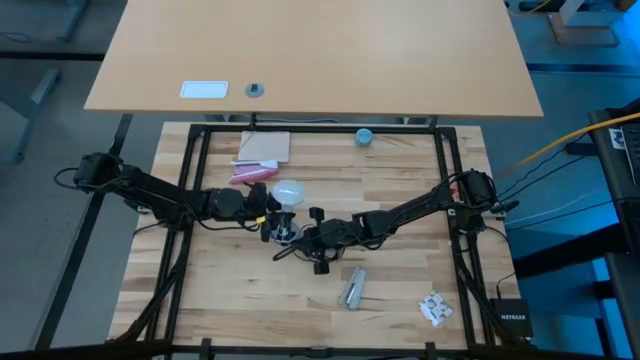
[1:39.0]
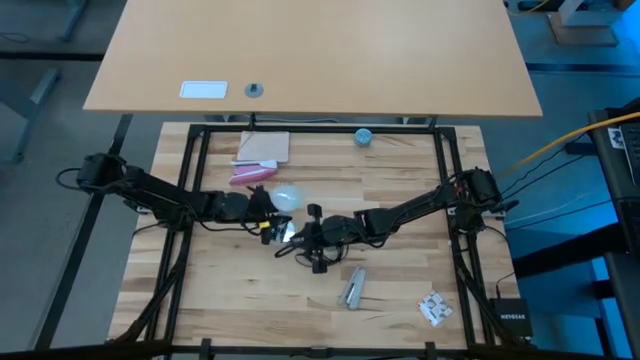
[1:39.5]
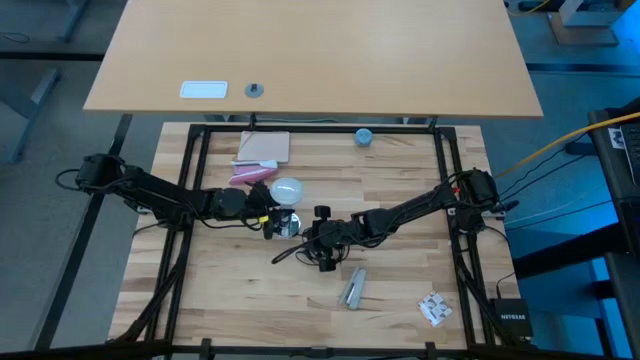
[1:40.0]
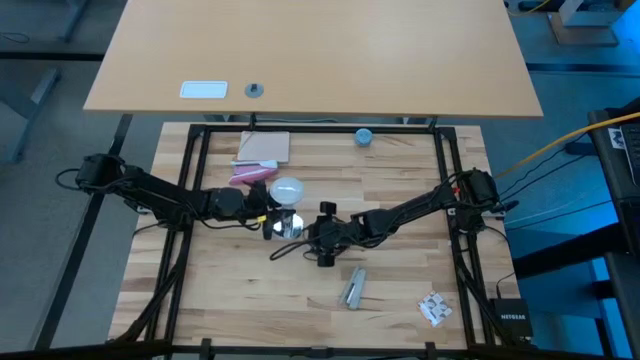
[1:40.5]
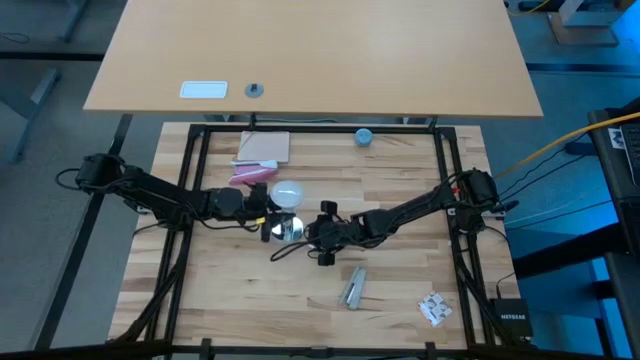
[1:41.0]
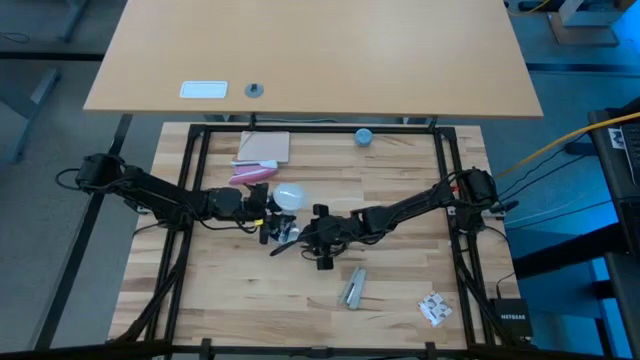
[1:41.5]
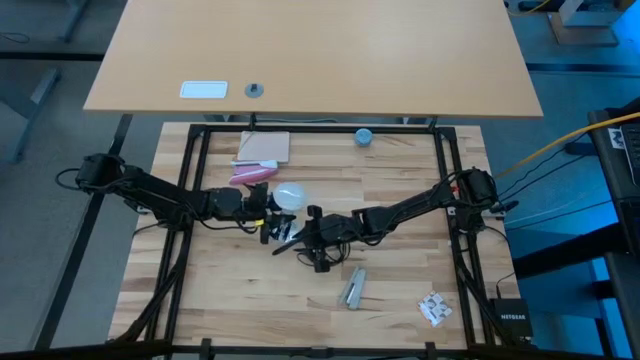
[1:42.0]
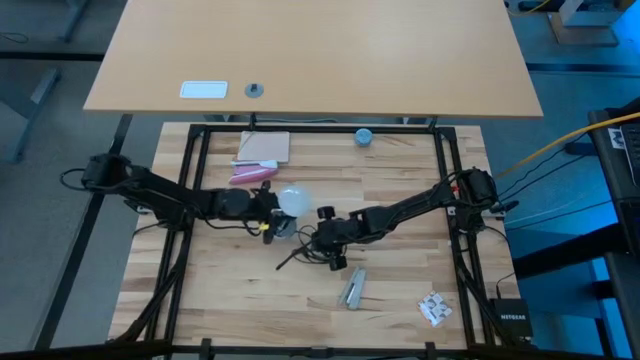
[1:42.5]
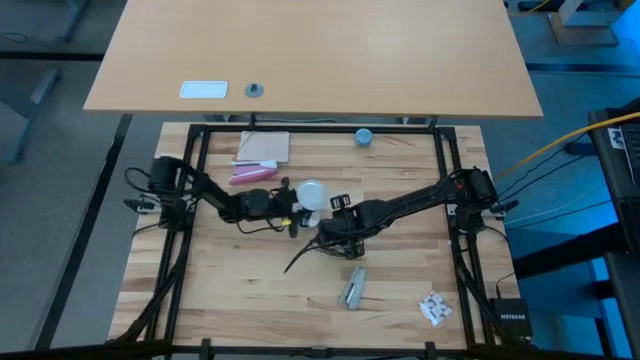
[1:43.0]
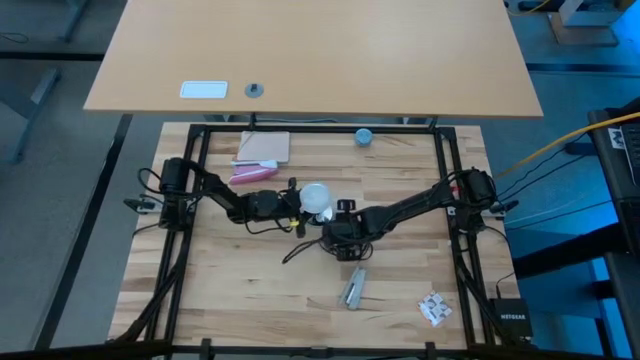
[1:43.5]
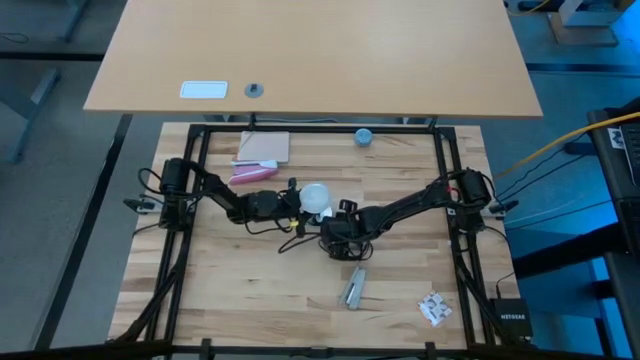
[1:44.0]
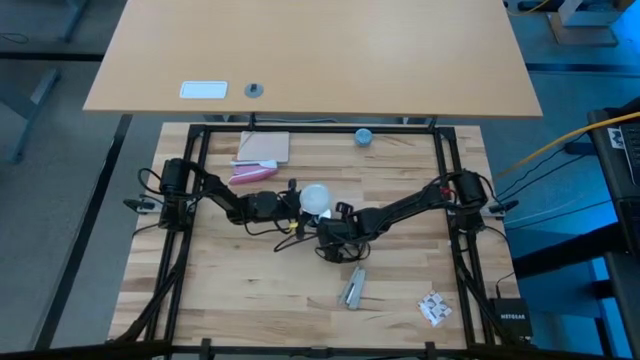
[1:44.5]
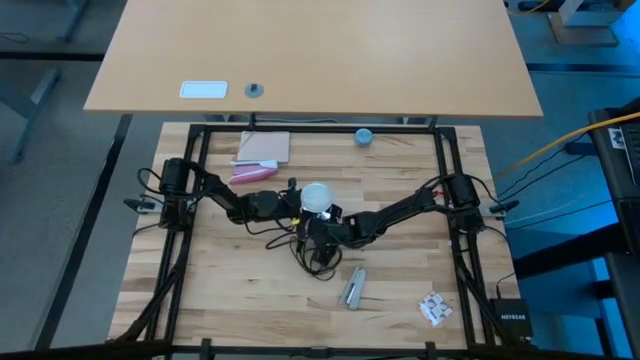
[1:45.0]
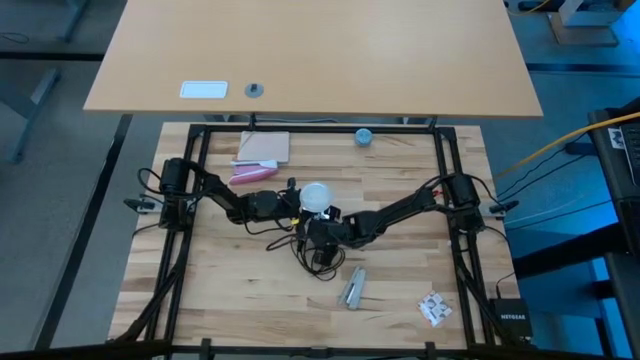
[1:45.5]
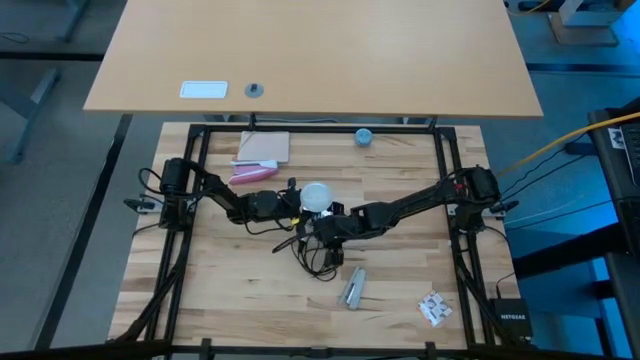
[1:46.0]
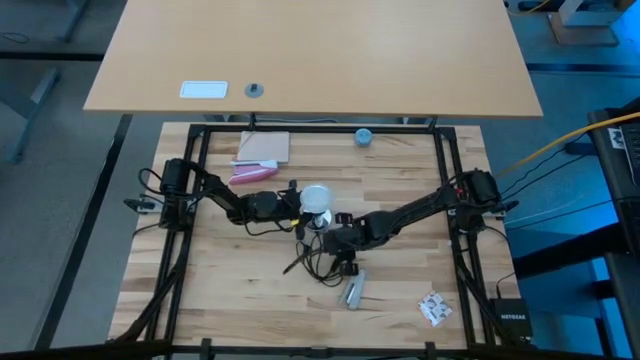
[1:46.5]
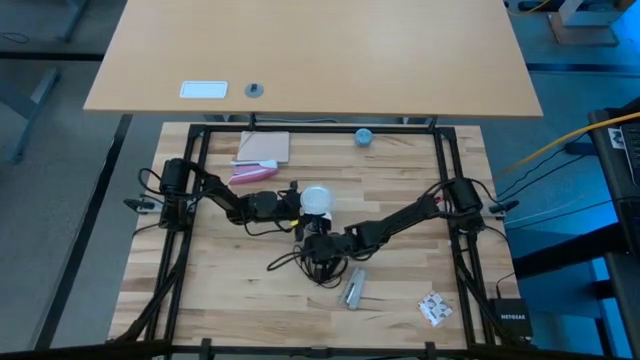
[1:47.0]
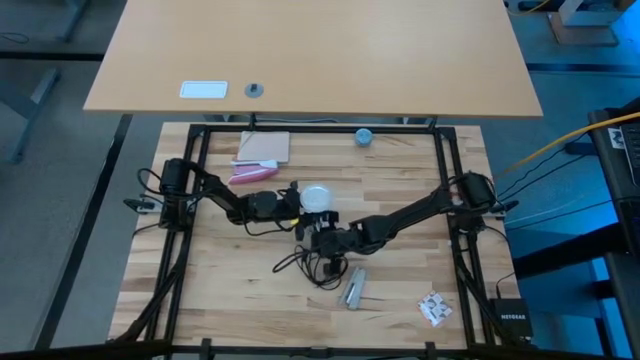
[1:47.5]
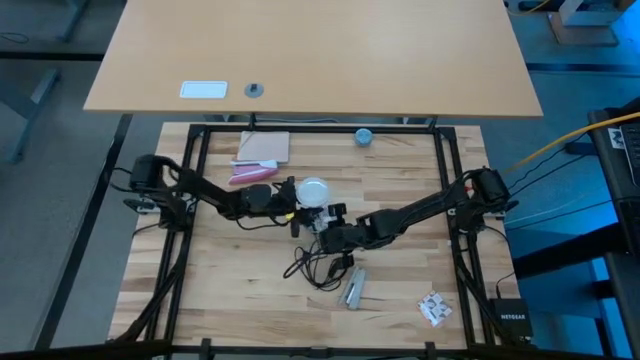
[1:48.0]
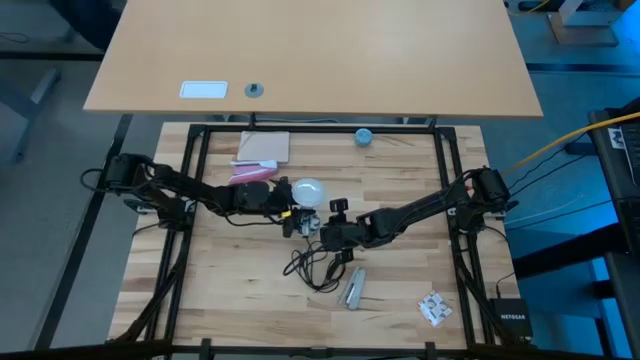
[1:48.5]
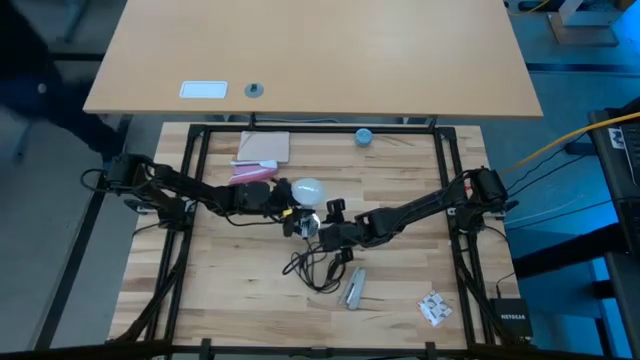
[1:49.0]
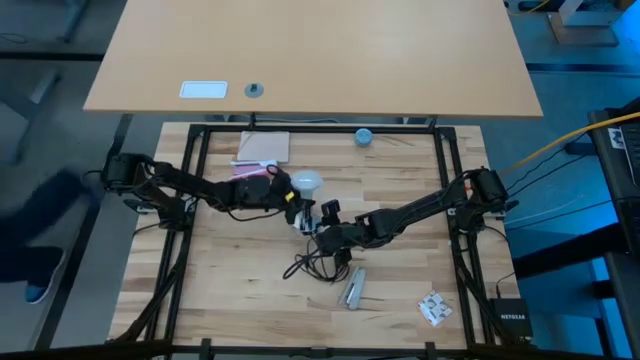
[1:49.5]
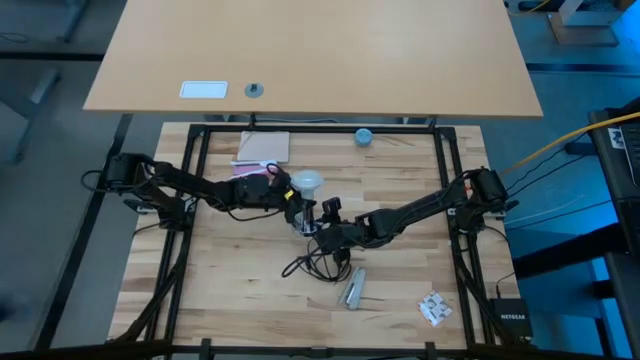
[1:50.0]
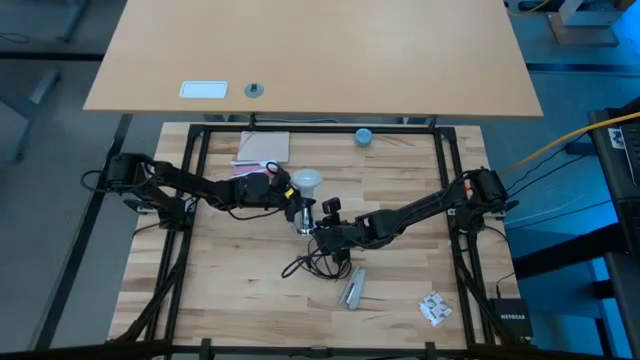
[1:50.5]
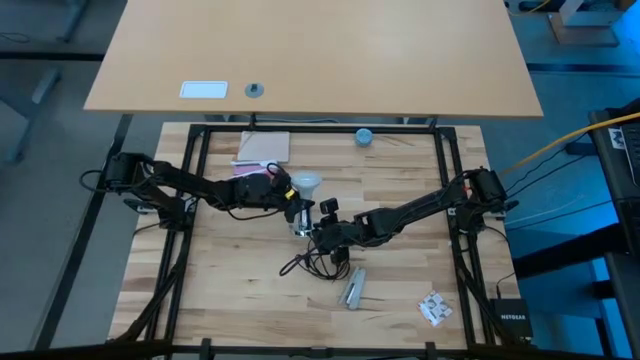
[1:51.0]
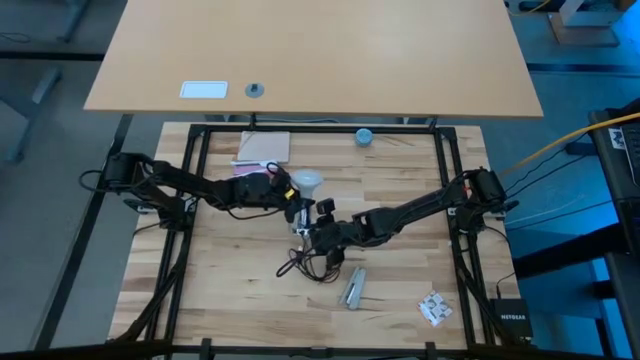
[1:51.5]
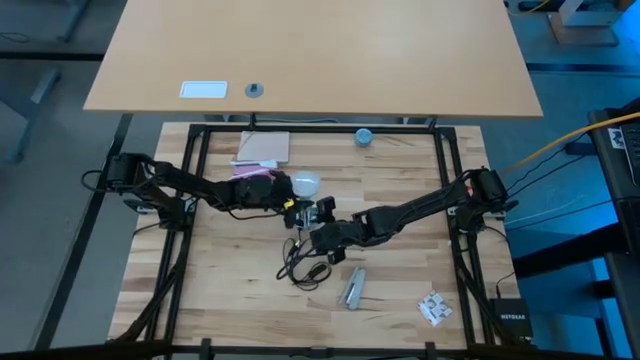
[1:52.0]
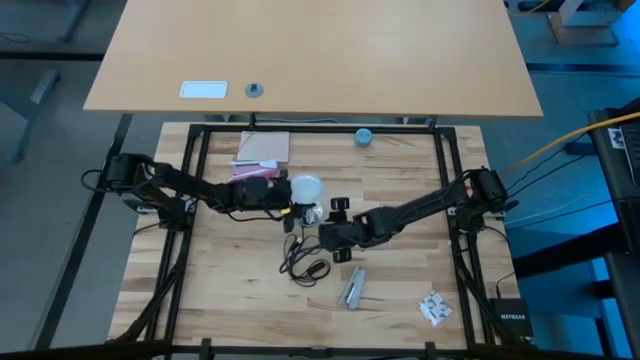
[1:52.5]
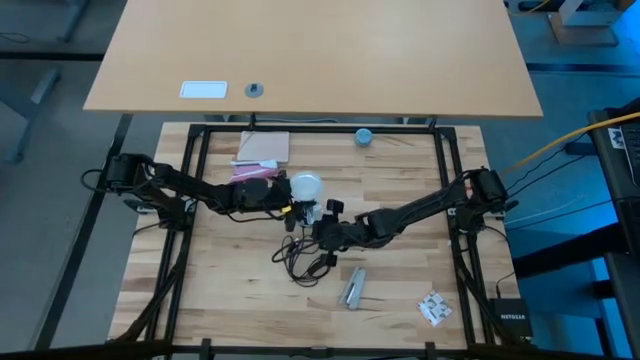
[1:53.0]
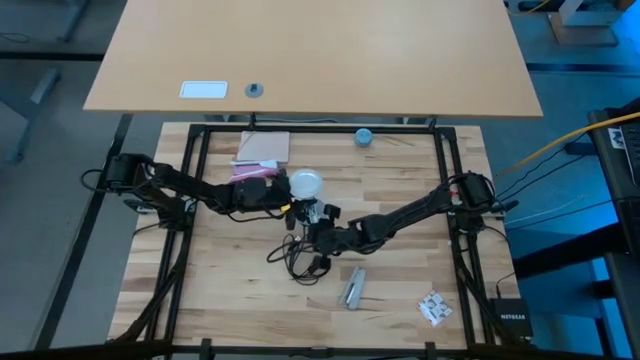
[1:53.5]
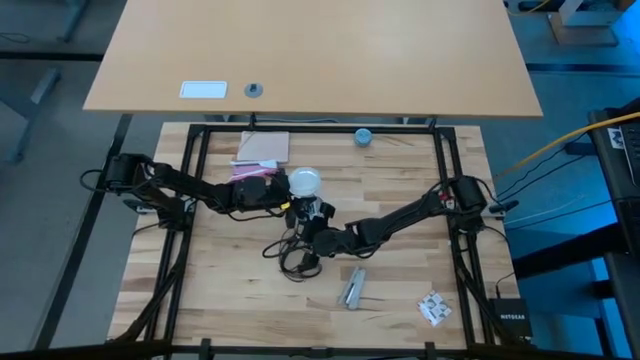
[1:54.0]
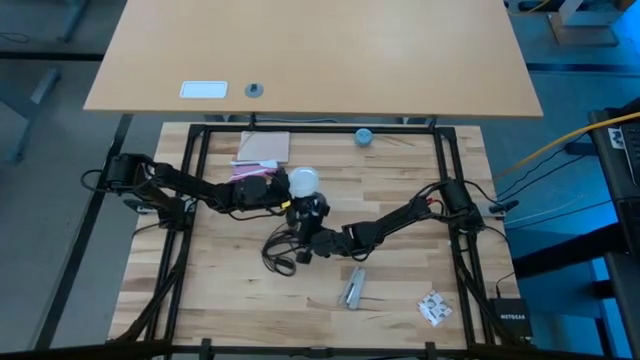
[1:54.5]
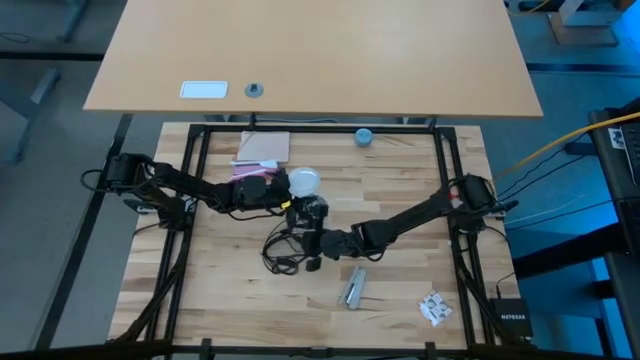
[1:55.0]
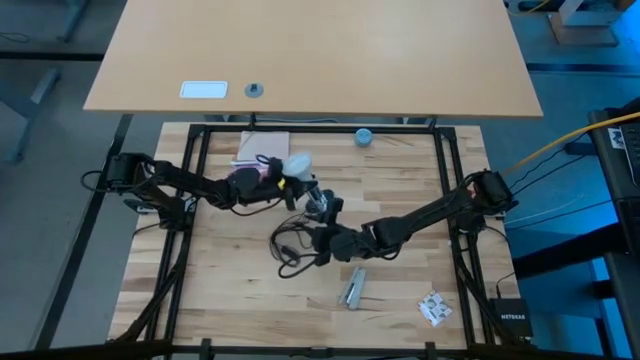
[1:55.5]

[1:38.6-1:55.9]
Task: Screw lightbulb
Remove the lightbulb from the lamp

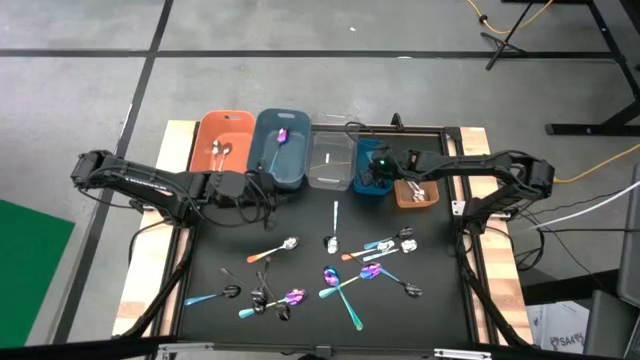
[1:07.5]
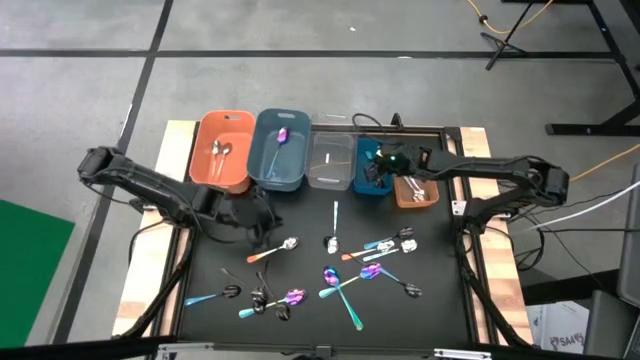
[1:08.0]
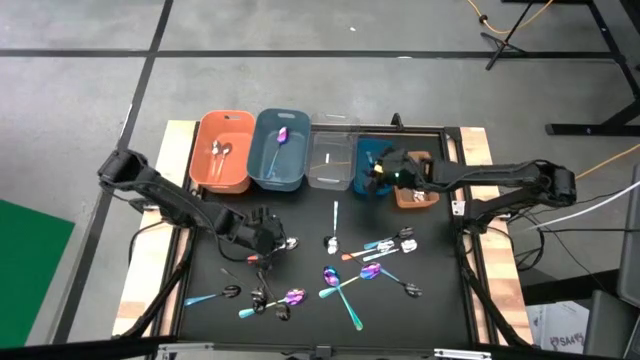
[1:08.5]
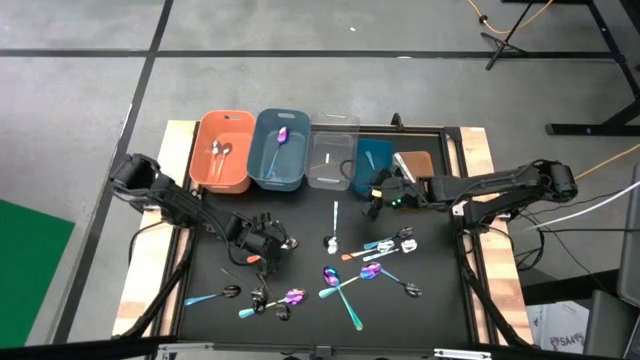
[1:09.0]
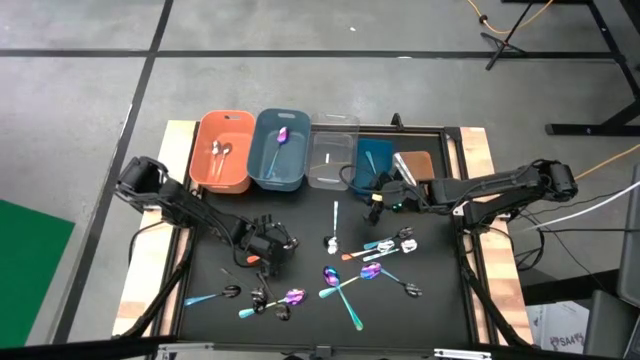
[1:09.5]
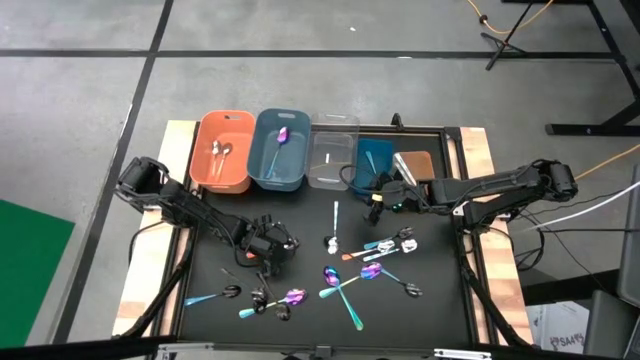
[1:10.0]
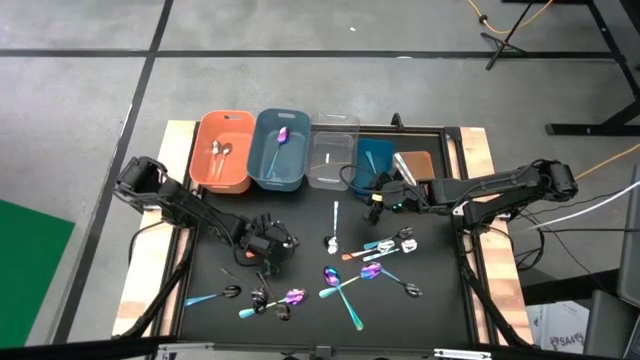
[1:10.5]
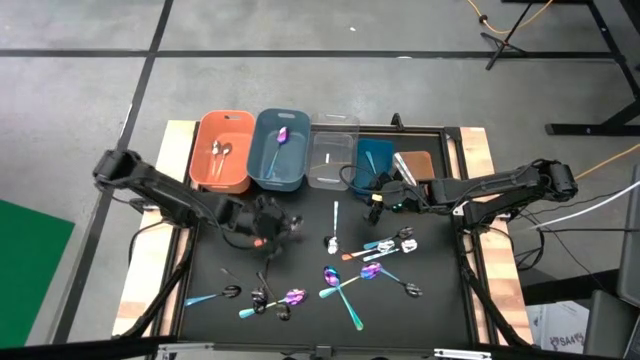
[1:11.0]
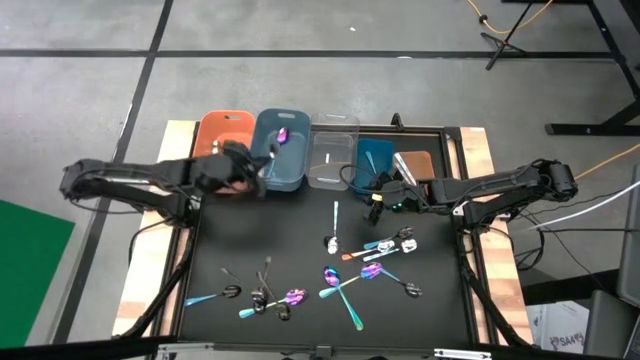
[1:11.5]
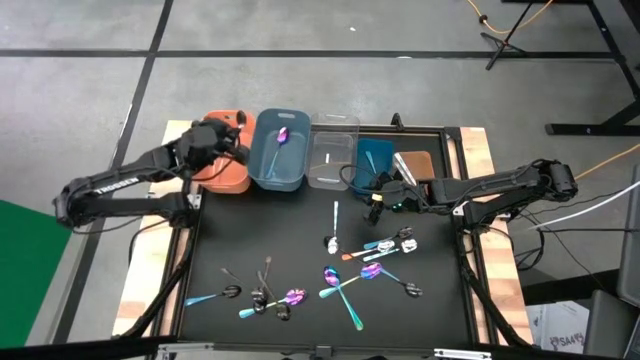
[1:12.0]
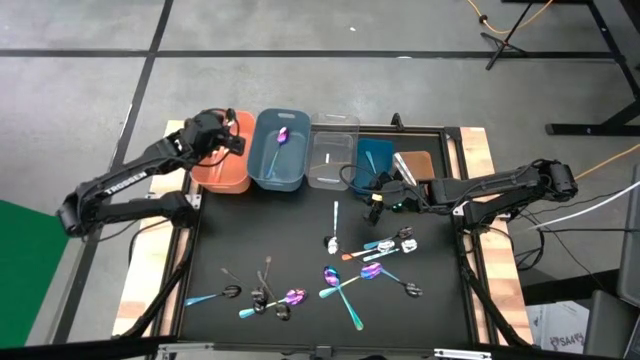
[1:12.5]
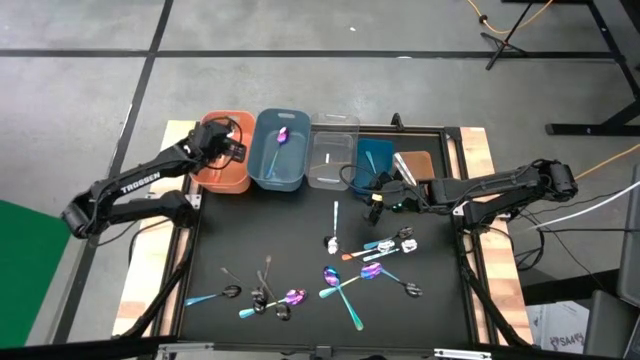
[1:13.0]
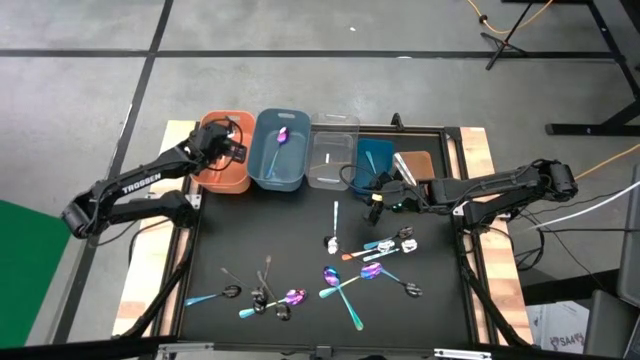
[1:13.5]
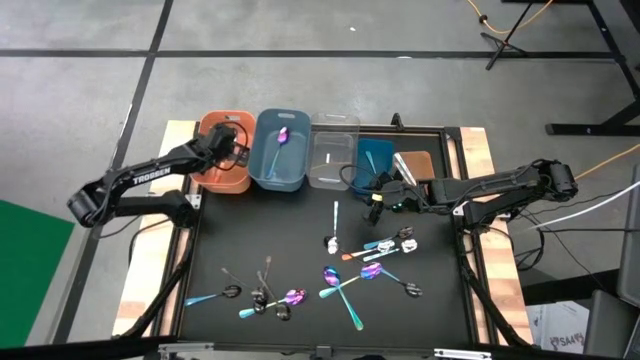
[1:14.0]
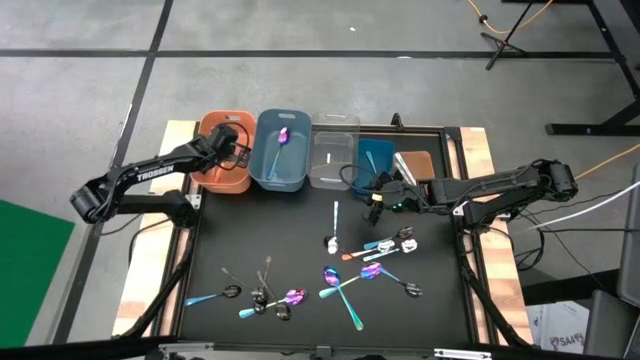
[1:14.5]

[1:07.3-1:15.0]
Task: Sort silverware by color (type)
Put the orange spoon into the left orange bin
